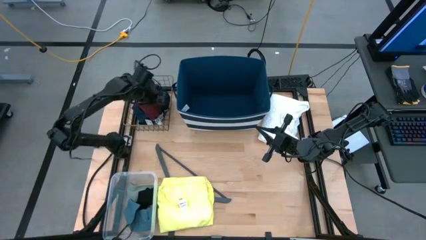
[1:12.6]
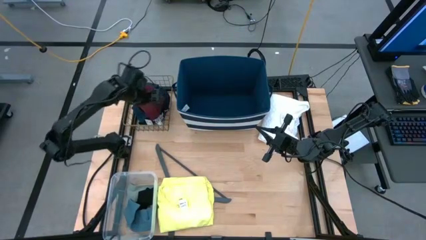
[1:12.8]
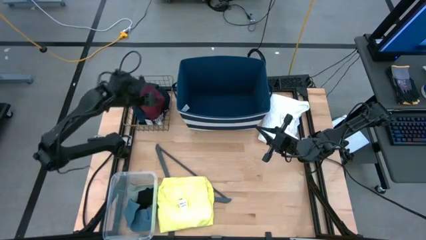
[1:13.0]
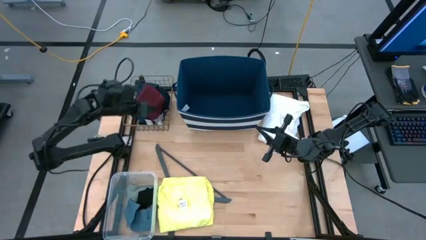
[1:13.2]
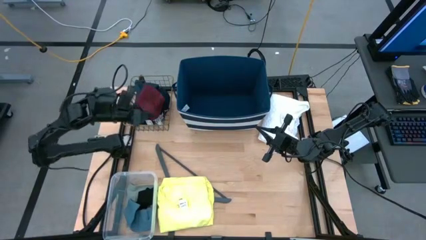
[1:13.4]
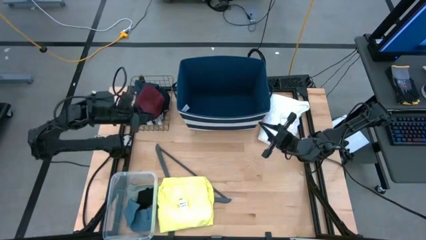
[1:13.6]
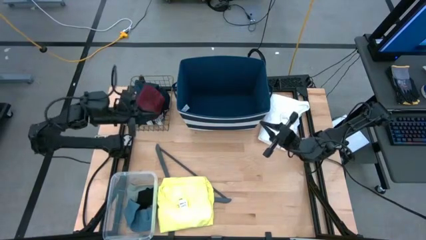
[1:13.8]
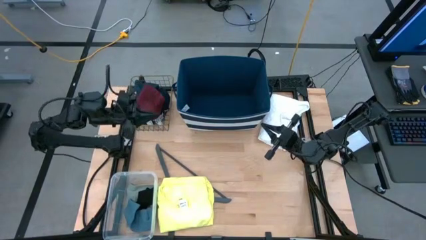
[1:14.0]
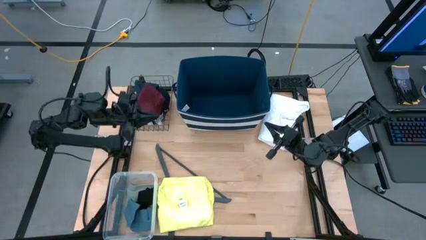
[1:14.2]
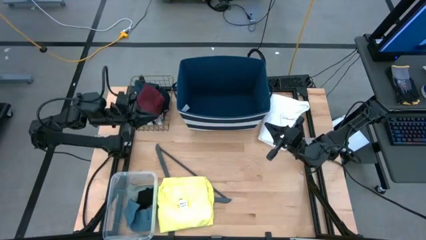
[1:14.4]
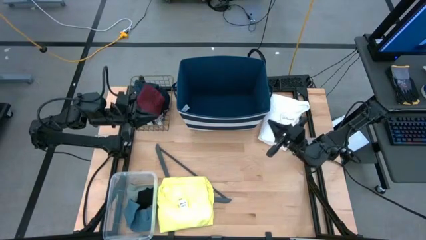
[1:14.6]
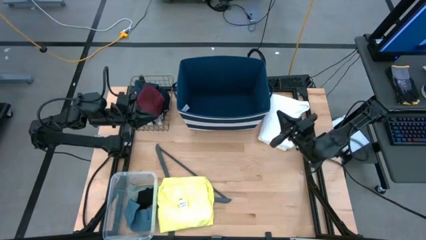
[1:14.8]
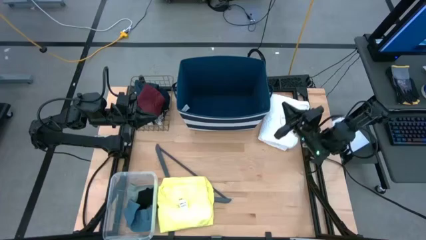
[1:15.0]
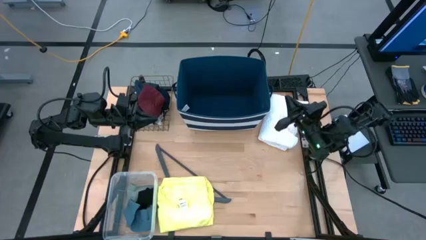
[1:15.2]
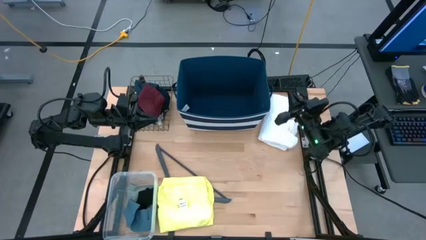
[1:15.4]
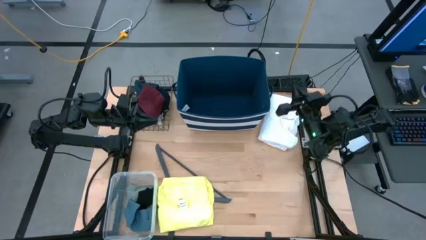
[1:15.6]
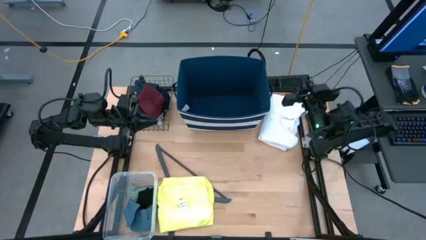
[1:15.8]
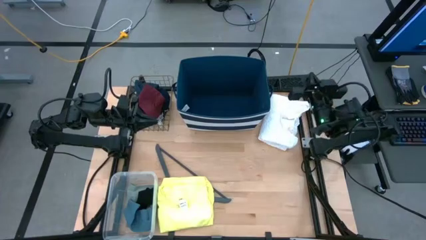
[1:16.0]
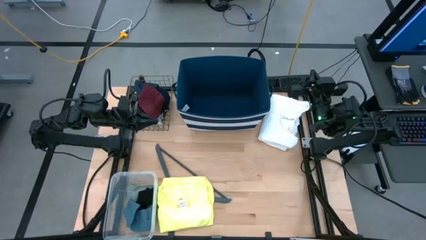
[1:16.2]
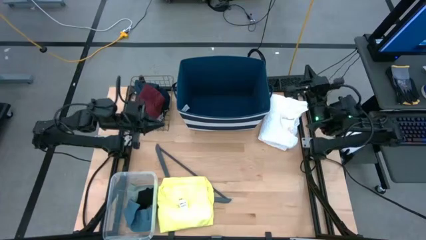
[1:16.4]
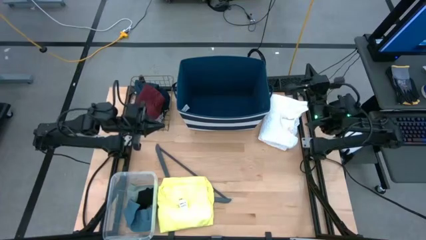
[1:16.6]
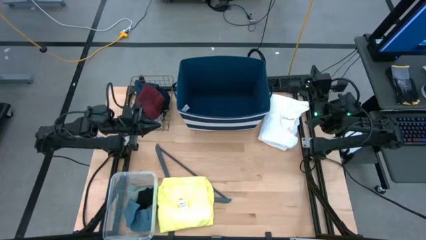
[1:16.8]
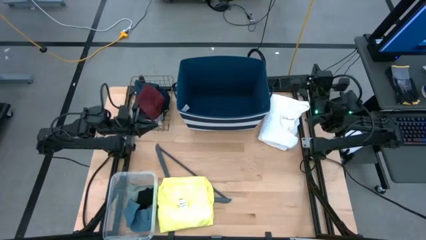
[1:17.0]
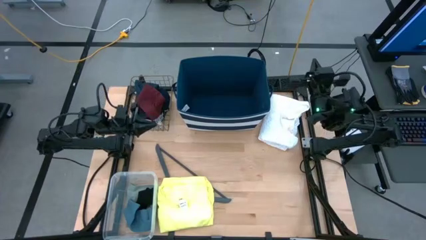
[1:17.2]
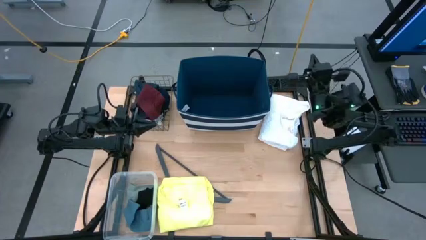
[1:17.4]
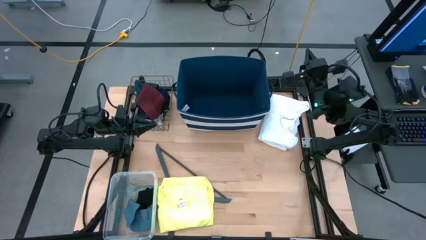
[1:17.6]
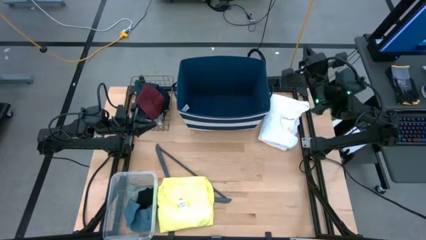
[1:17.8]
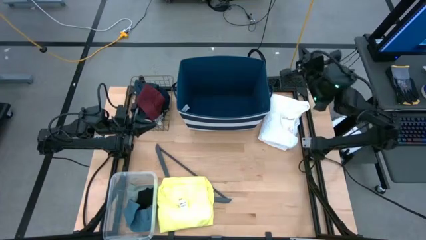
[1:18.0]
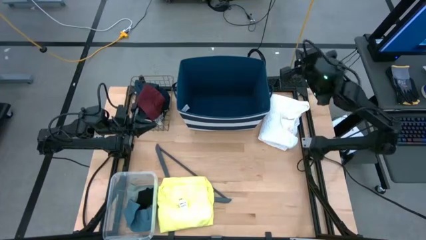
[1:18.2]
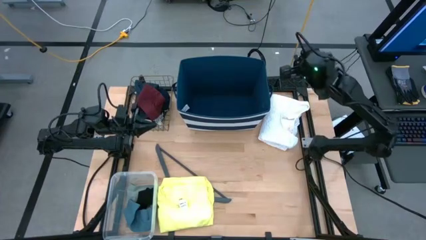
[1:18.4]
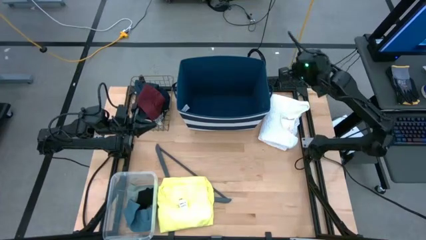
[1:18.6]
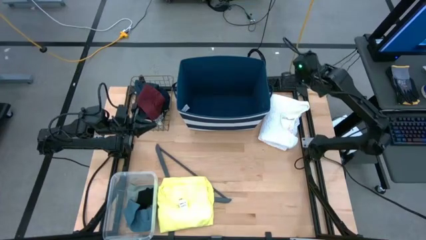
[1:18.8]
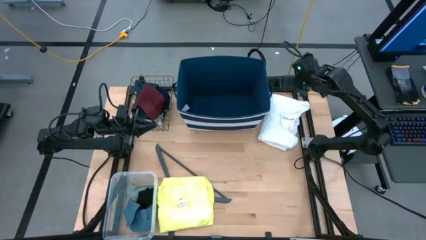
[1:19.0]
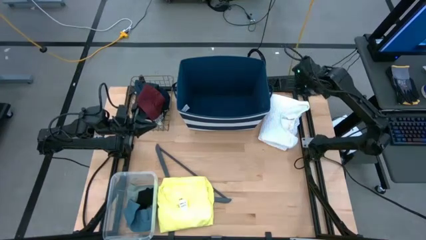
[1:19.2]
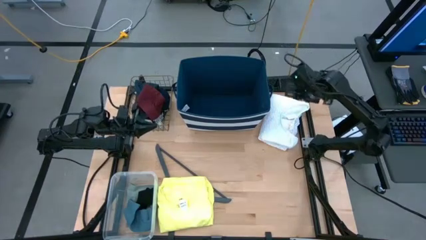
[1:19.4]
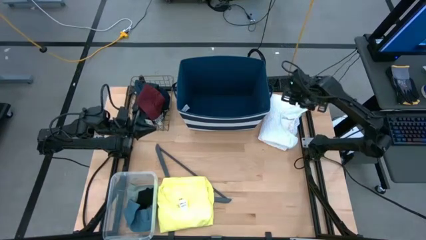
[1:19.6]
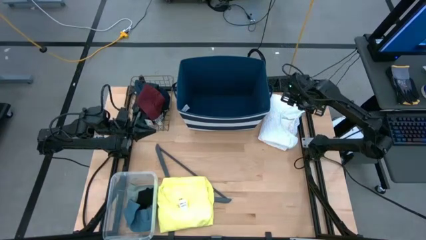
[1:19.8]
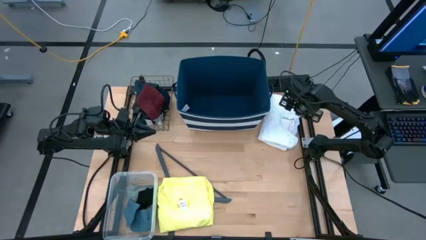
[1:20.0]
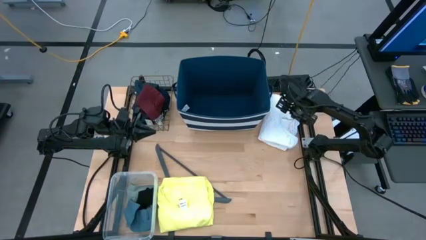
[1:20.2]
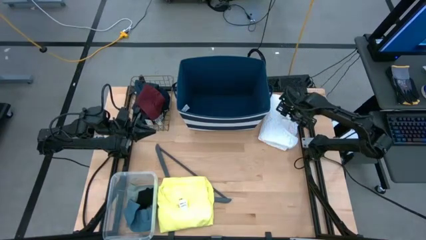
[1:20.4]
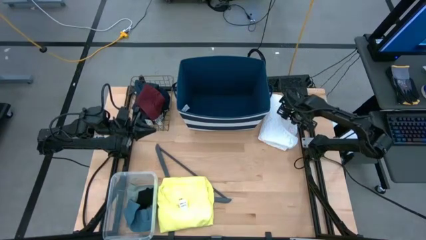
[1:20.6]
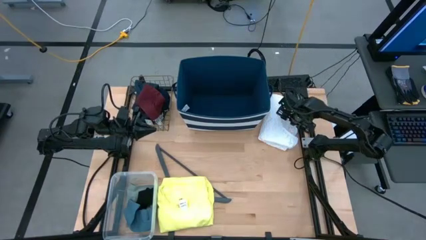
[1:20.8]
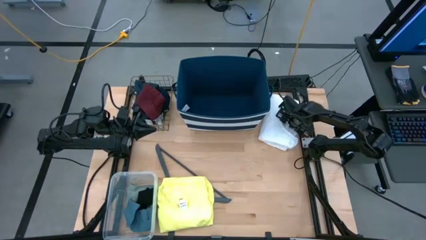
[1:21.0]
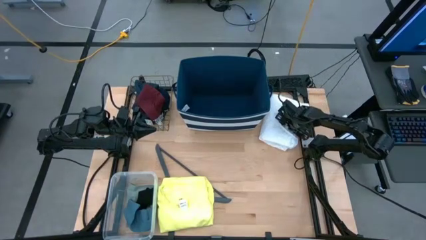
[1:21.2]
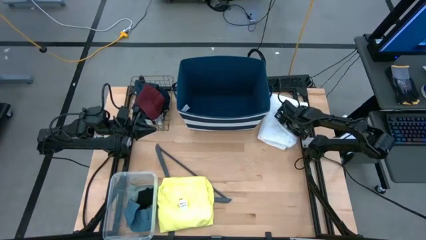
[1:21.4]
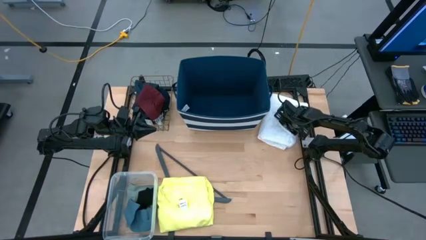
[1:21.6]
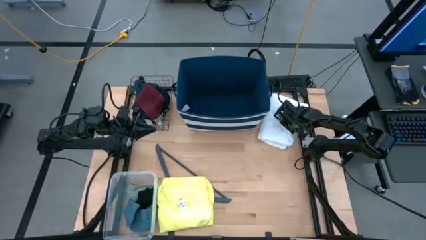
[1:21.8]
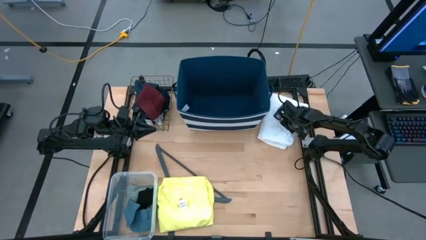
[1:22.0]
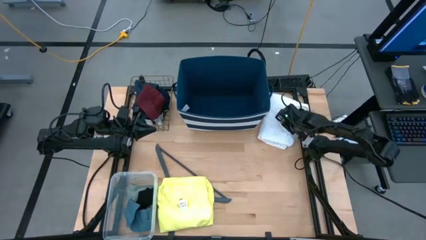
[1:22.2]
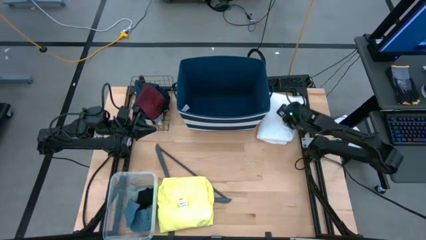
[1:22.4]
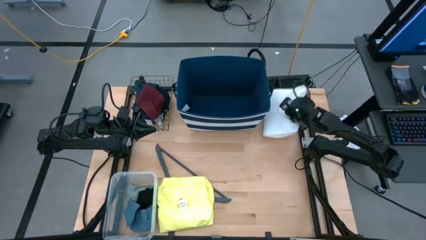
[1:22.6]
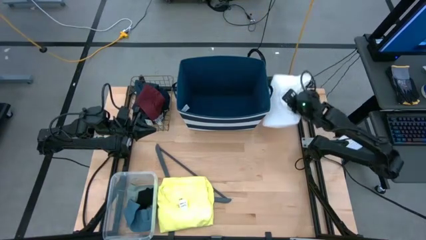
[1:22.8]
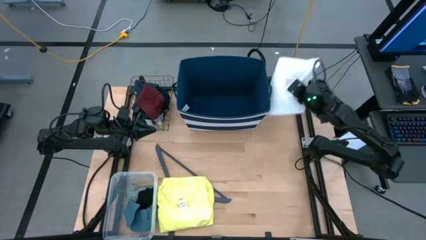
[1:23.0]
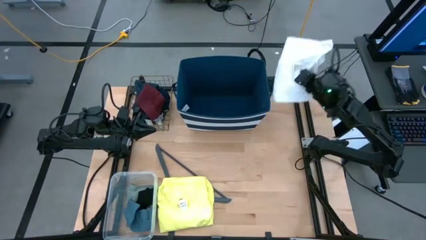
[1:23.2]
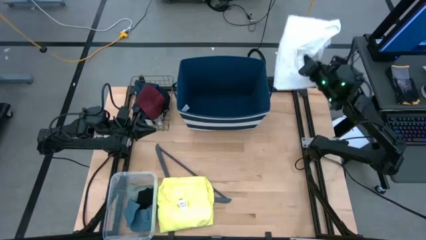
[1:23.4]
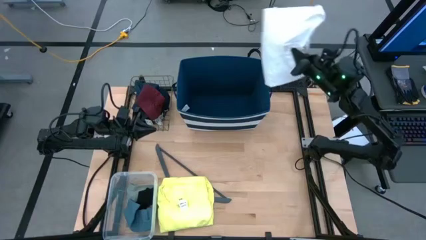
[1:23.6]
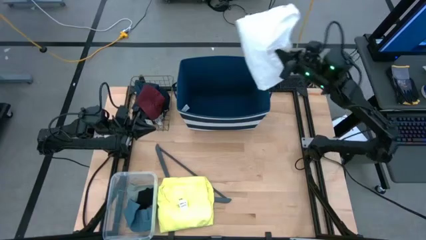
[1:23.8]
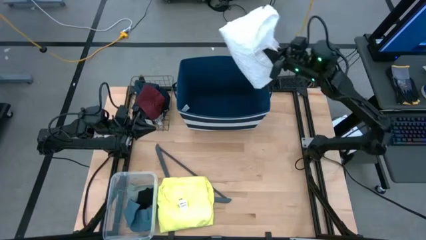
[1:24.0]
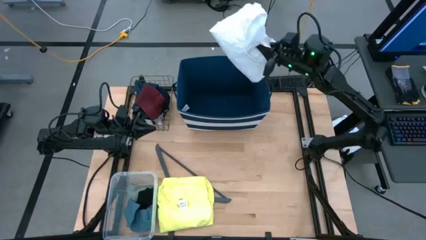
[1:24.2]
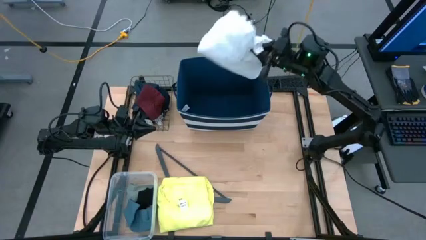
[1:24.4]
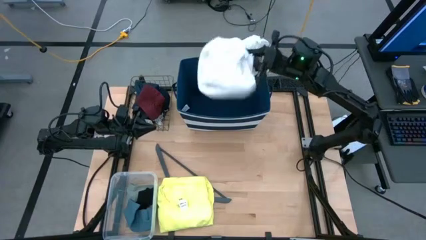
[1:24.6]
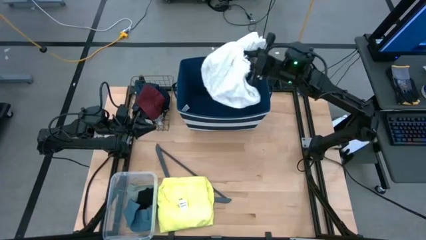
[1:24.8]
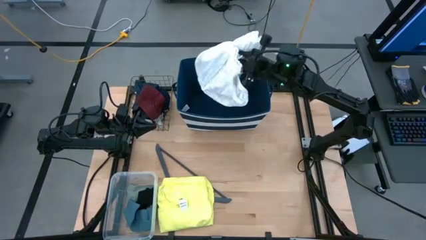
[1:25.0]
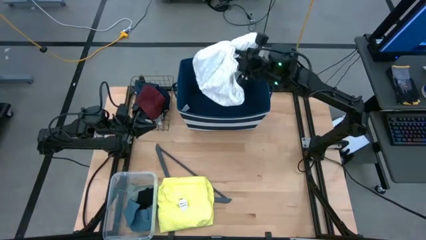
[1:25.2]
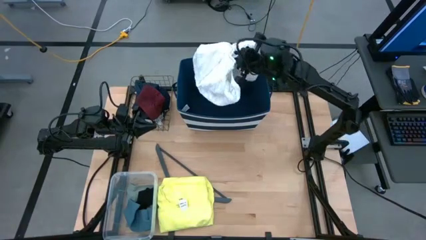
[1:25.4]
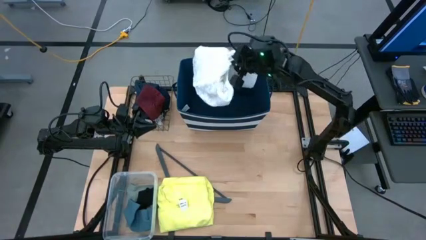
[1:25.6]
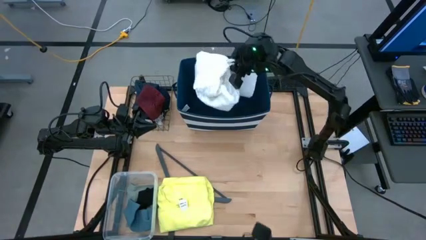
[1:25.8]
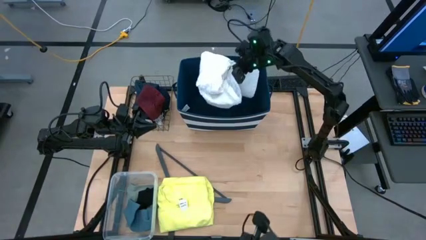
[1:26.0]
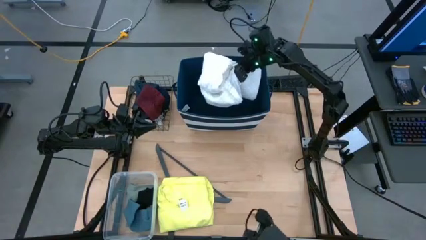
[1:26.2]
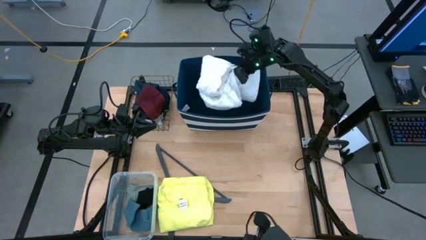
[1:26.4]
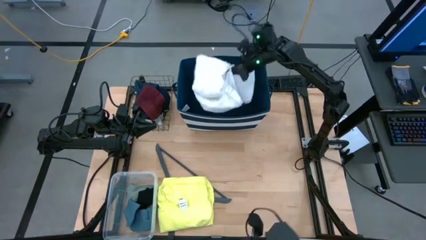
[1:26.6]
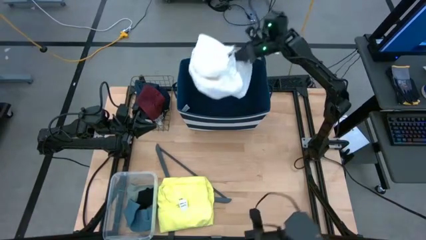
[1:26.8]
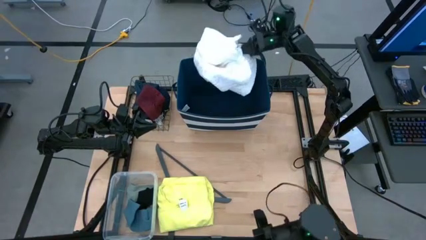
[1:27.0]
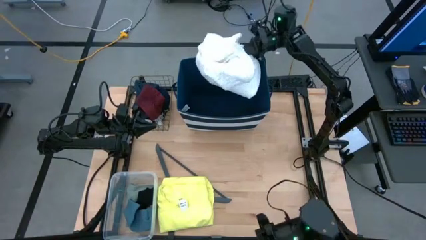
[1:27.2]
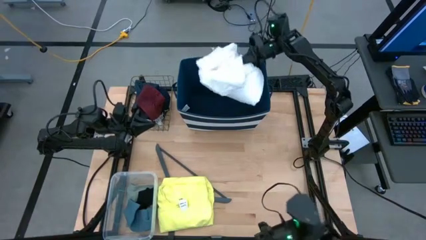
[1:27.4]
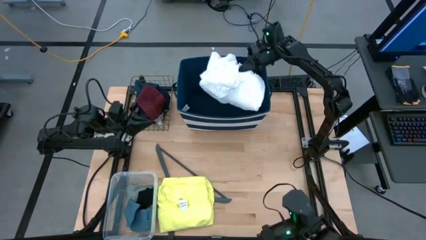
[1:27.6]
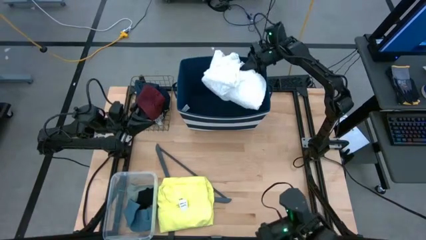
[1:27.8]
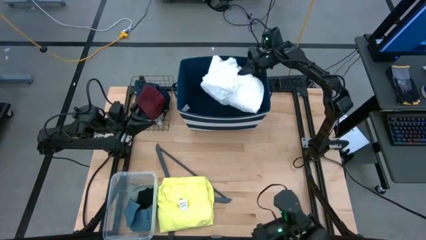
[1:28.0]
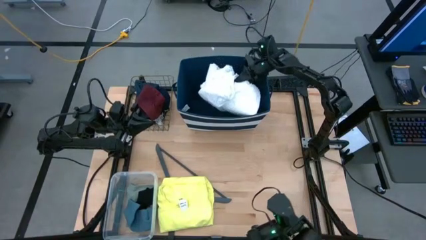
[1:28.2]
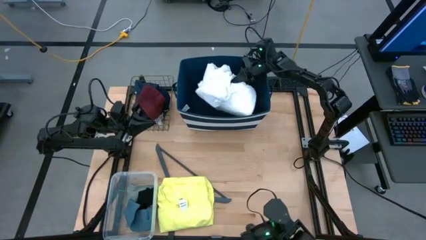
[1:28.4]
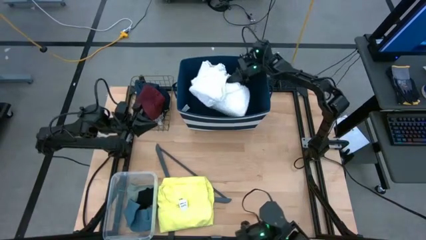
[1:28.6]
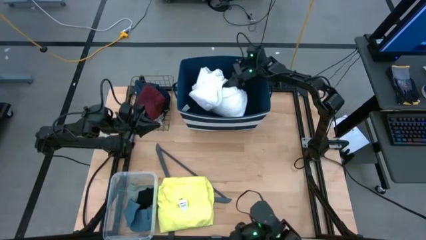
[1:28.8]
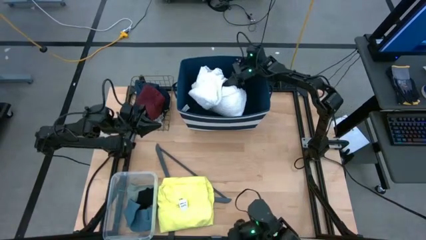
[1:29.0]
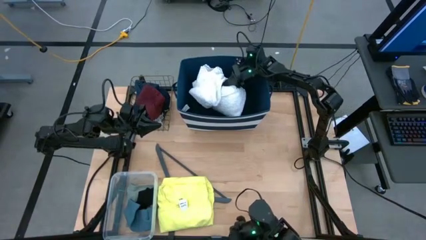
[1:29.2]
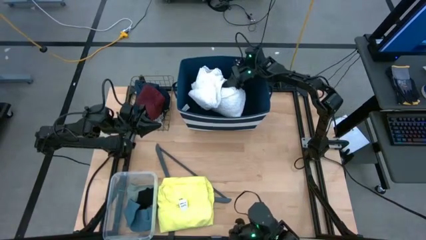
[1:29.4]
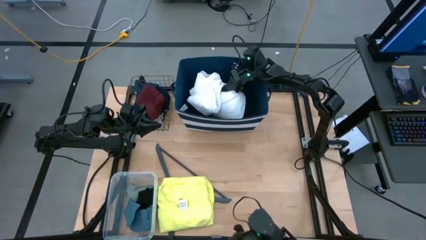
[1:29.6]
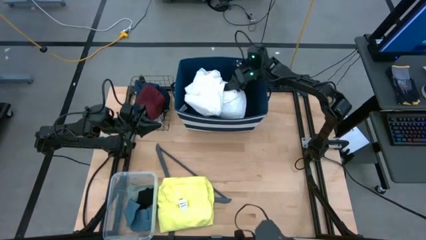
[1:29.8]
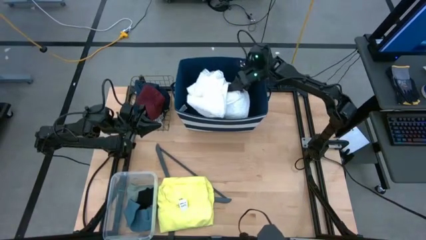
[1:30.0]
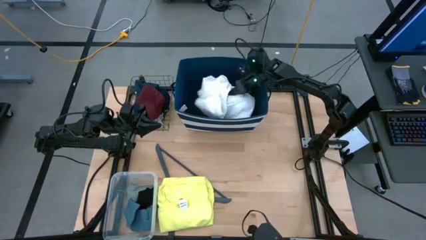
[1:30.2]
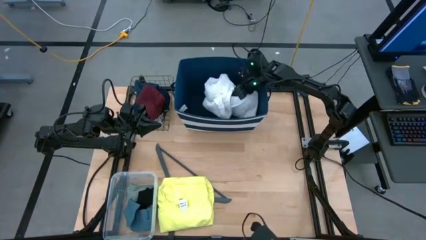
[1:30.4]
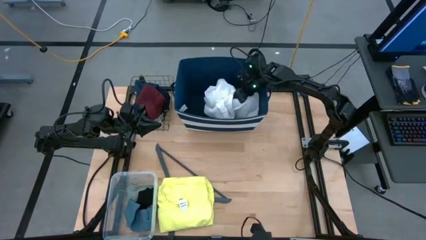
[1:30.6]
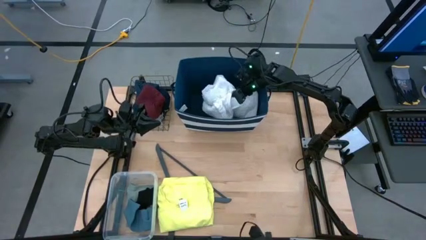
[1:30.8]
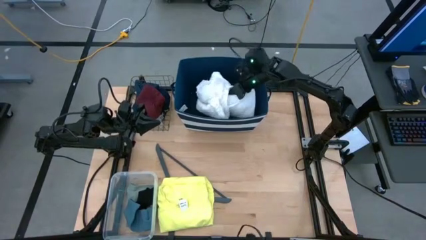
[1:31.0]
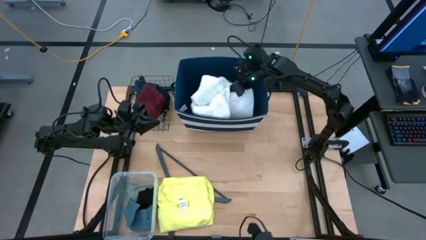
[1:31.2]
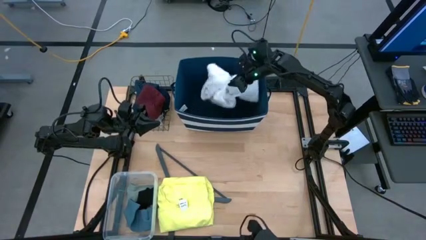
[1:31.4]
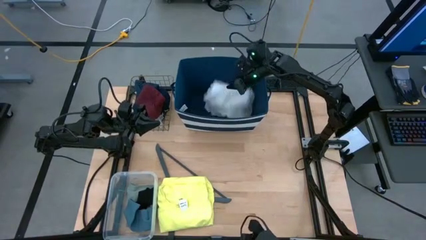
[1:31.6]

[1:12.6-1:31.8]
Task: Pick & Place Cloths
Put the white blouse into the blue laundry bin
